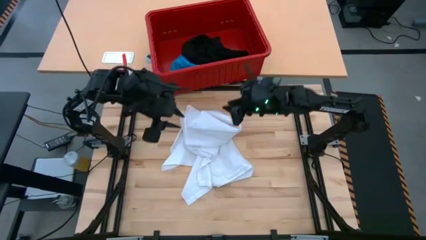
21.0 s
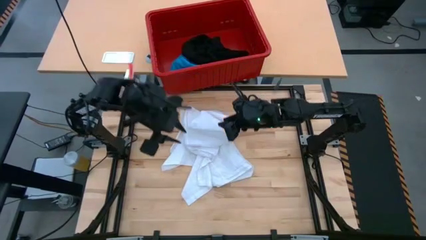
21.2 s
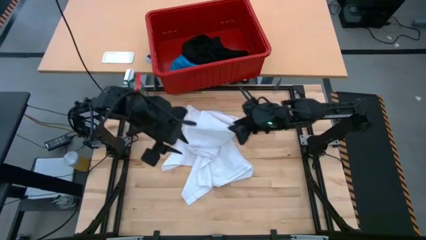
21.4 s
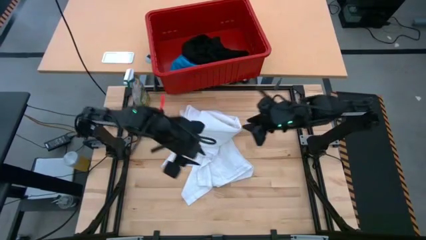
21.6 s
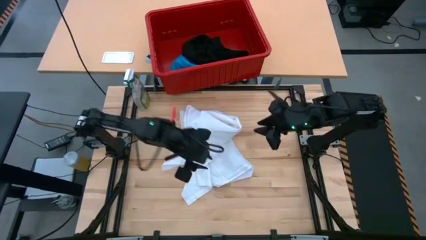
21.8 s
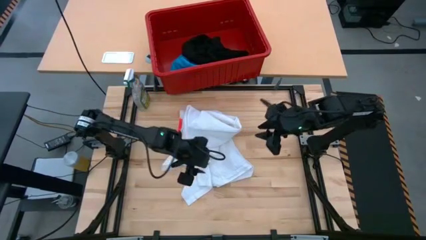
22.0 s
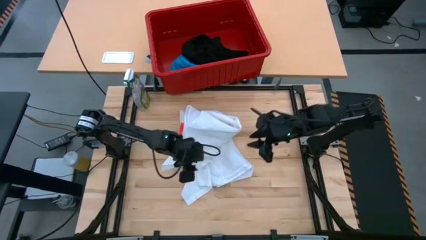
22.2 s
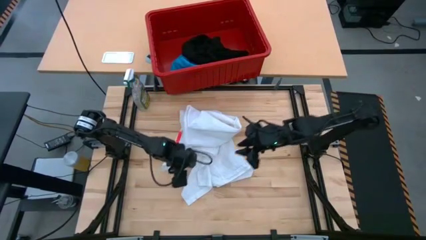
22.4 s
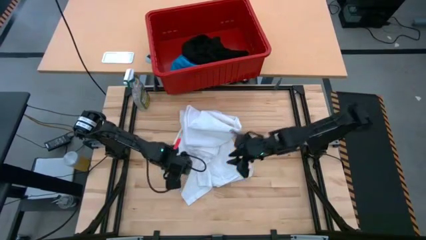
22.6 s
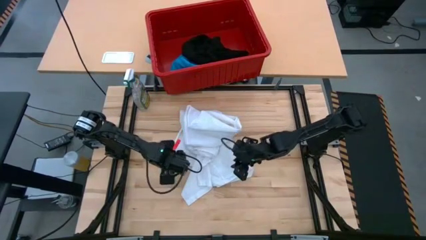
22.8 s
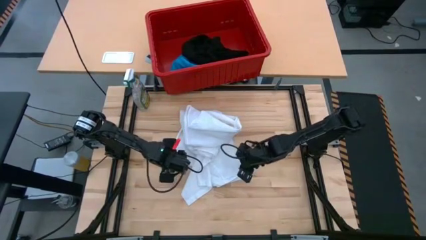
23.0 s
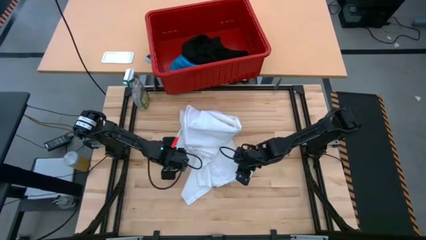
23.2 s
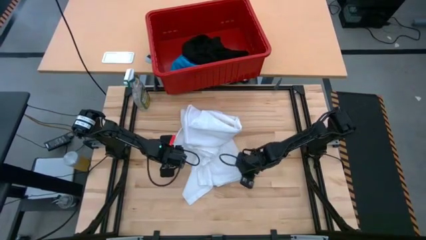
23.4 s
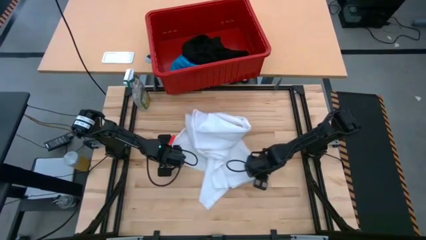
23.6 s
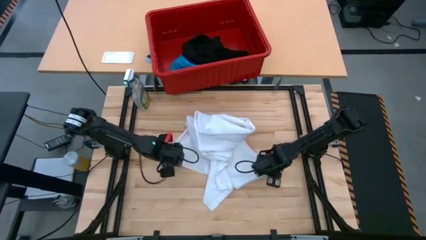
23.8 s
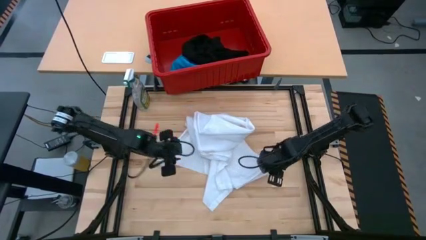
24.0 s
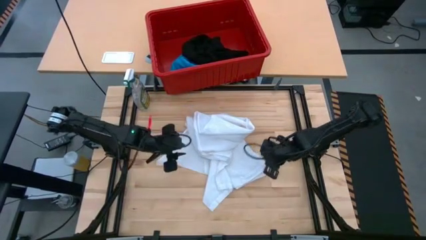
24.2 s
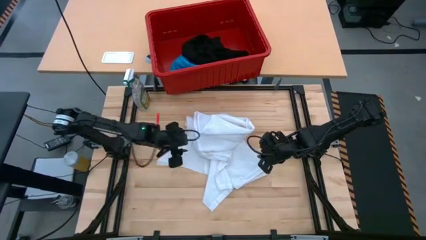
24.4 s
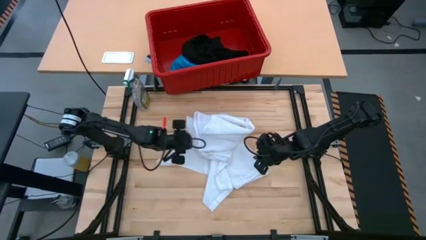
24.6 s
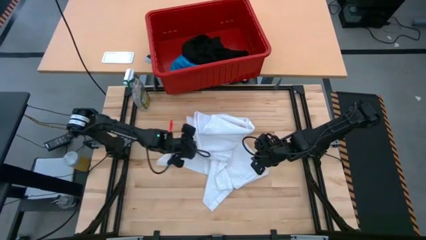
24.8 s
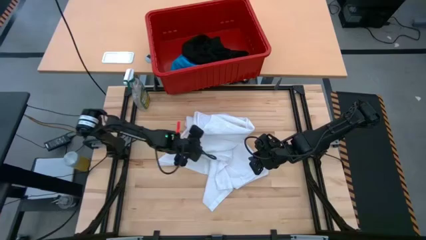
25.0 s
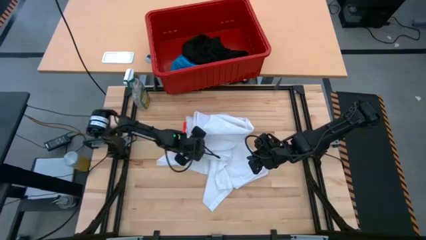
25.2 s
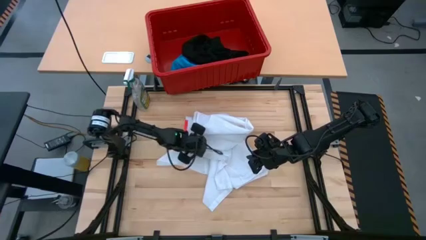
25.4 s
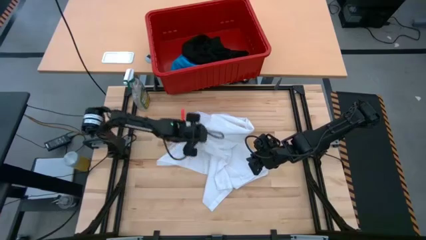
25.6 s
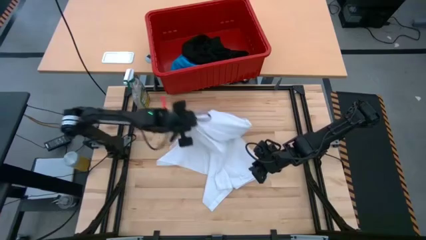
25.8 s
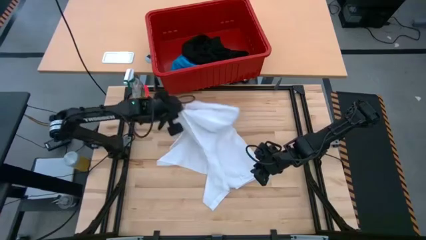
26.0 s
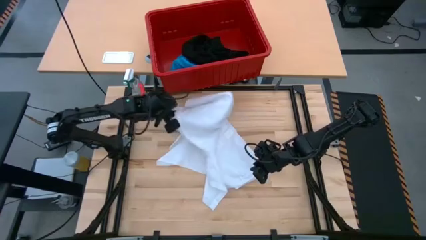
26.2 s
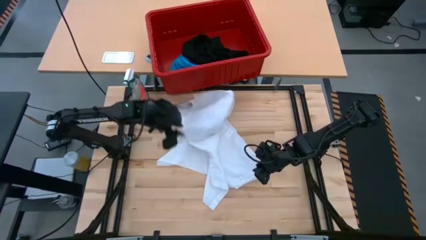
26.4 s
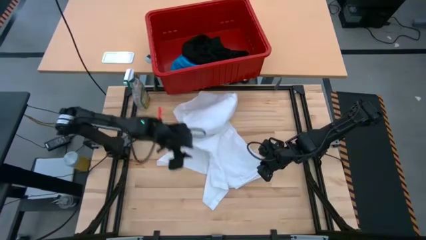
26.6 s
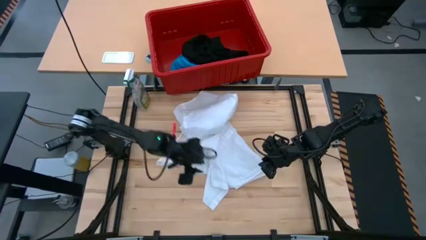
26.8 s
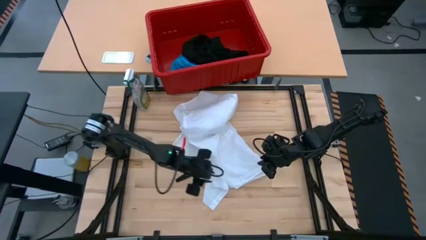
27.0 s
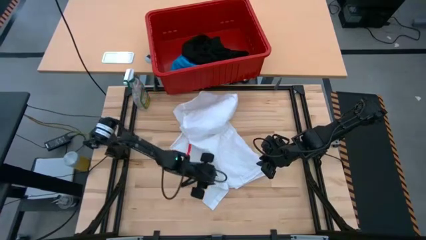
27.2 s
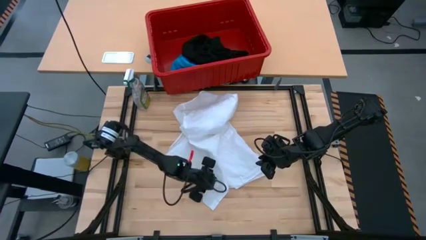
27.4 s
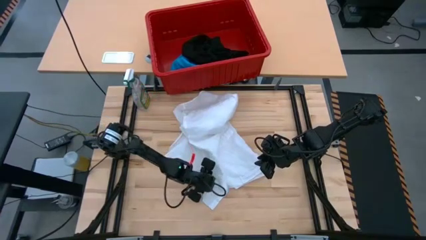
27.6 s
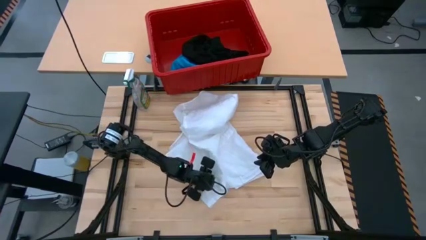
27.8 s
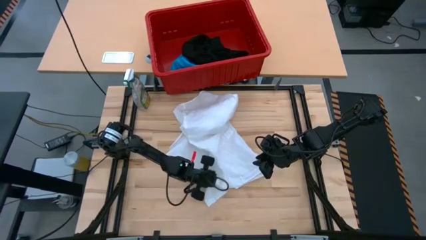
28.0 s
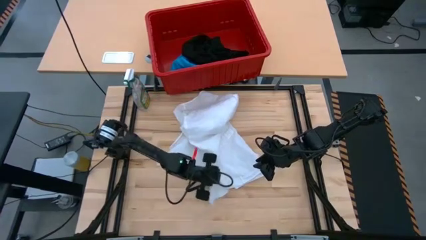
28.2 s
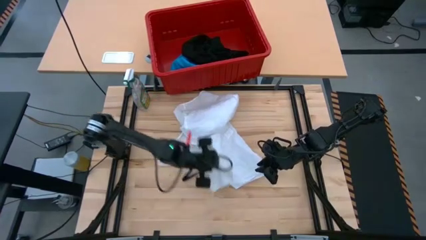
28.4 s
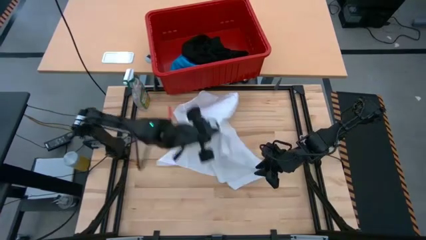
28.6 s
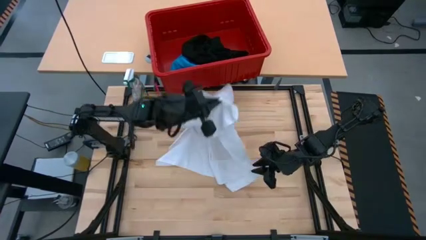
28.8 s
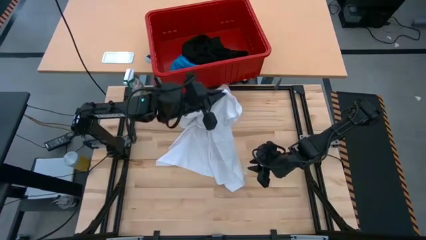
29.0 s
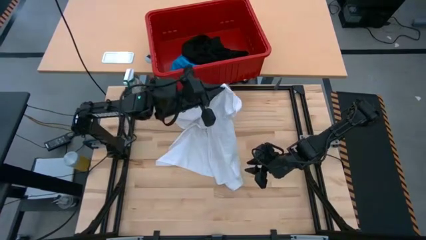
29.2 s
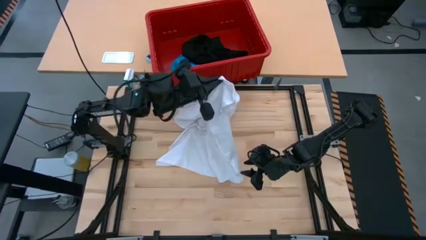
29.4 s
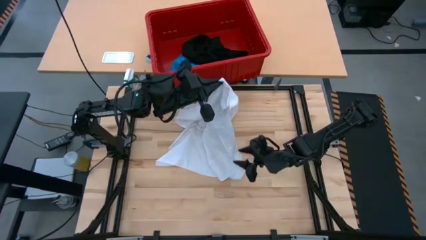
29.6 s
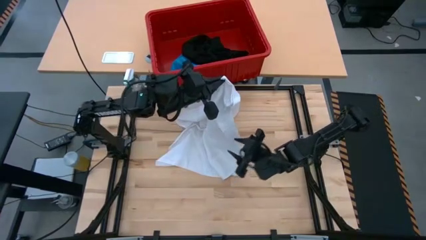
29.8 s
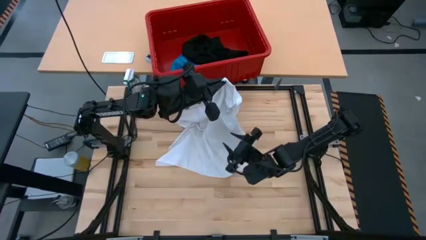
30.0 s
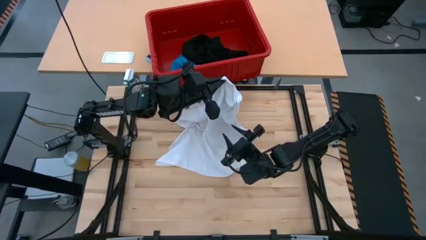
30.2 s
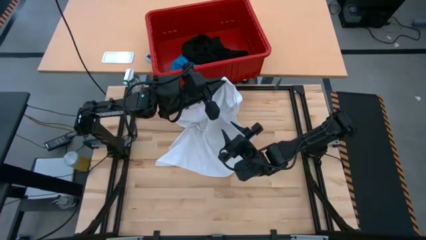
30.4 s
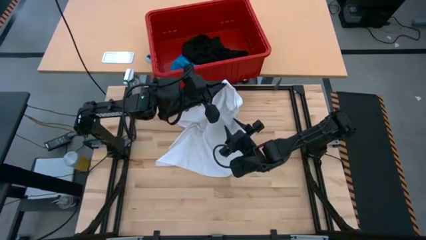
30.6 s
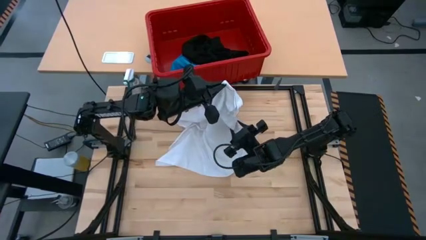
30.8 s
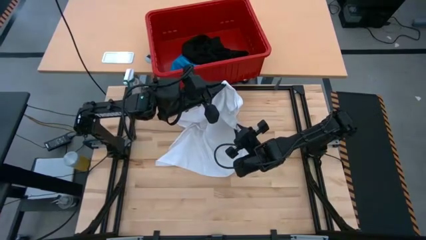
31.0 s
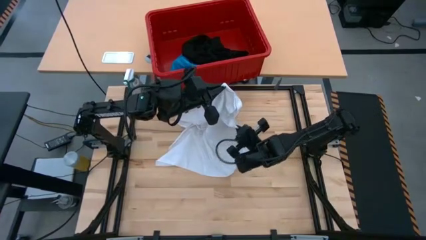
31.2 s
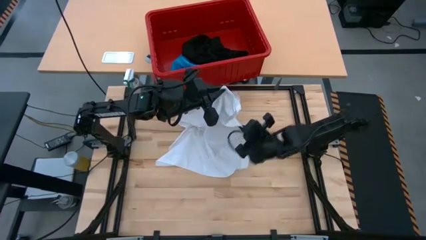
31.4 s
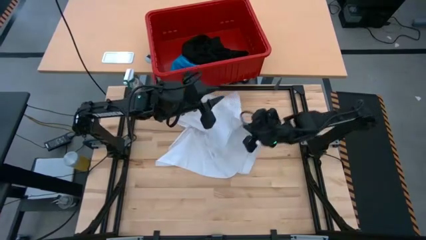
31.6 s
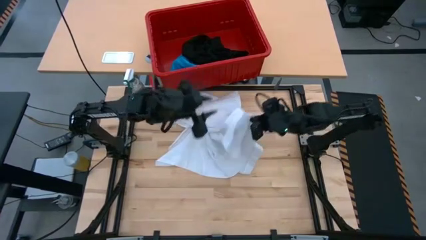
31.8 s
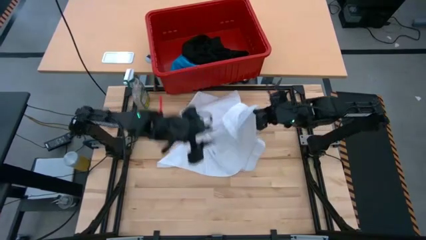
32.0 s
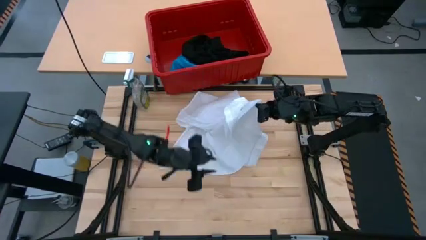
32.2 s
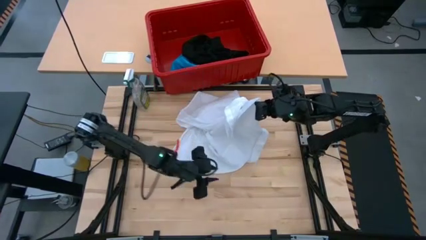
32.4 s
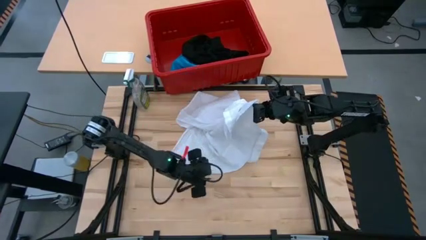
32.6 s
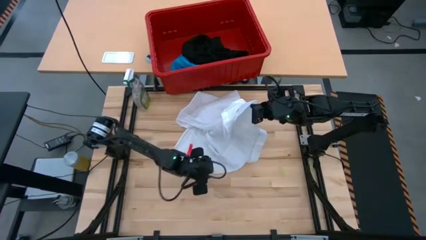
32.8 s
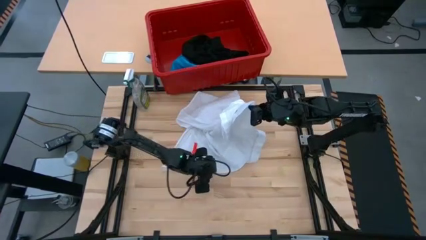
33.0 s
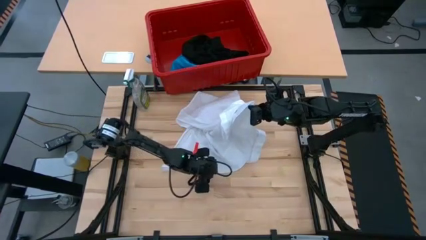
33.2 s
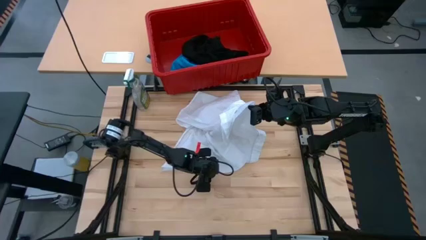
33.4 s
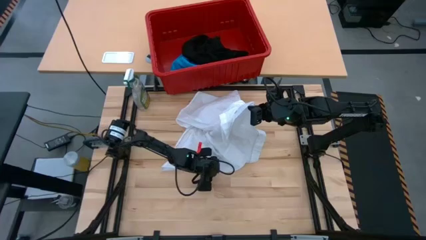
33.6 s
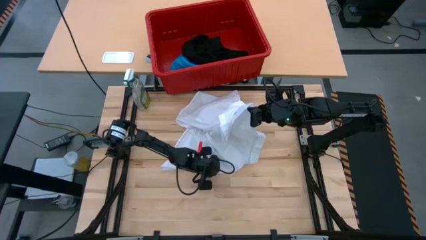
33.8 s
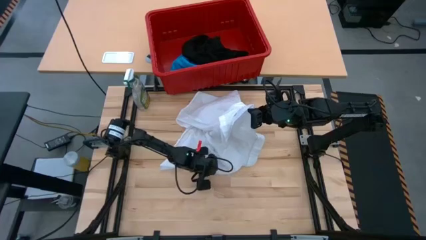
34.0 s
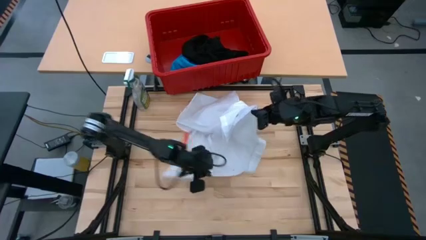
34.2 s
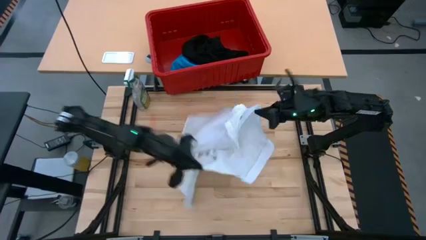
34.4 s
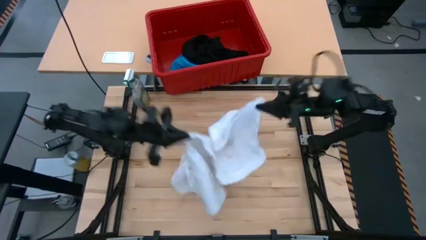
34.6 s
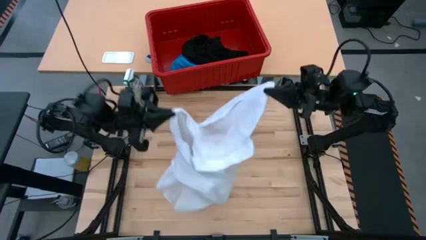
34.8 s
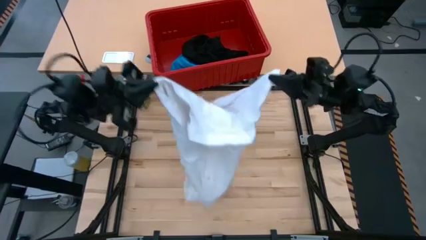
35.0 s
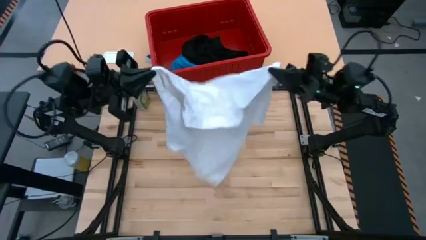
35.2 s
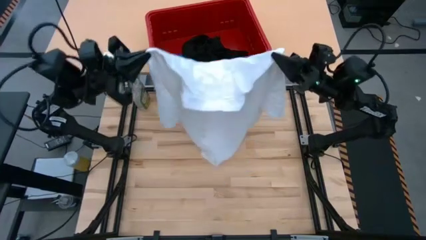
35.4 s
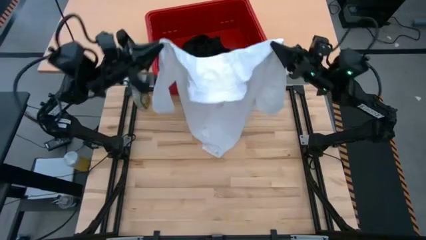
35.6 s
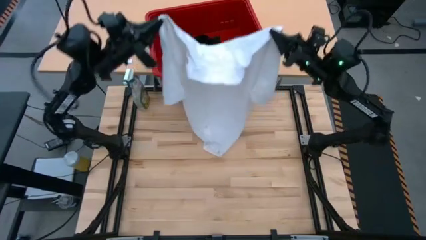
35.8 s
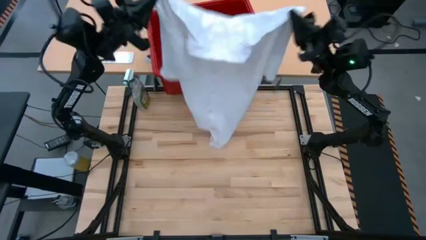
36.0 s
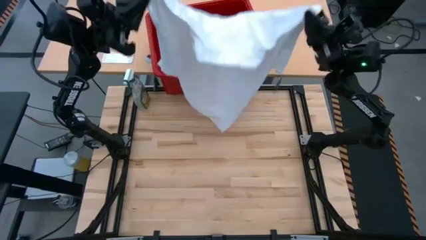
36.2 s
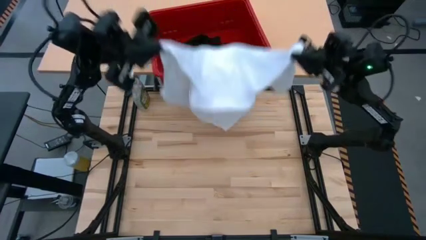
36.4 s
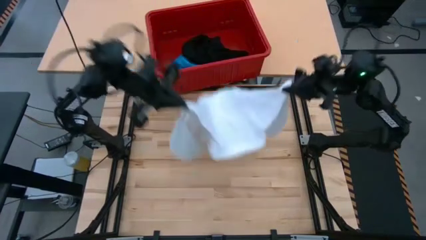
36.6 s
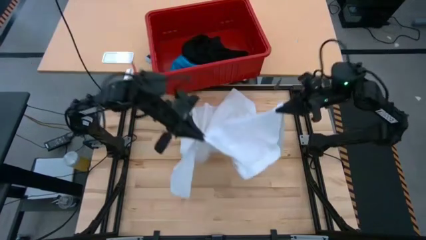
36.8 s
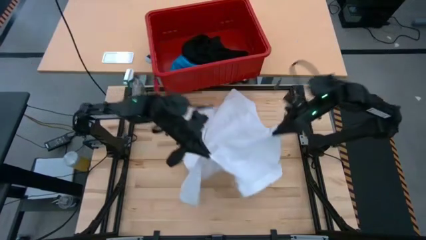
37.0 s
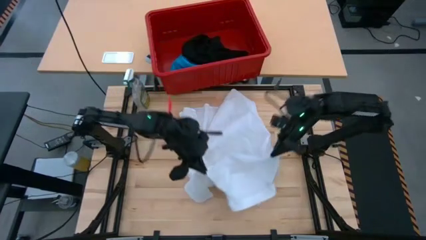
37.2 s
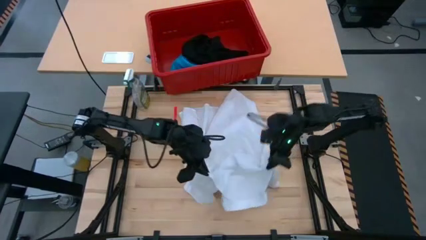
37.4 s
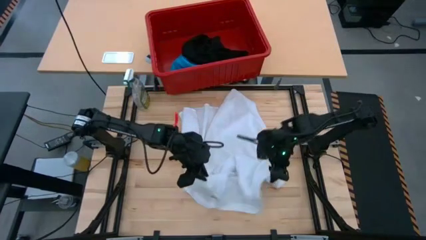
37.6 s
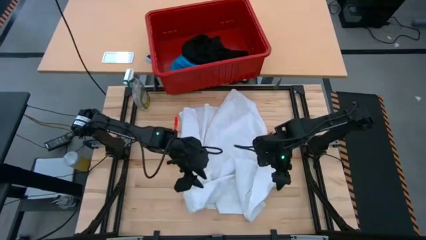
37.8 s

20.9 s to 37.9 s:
Task: Fold laundry
Fold the white polo shirt
